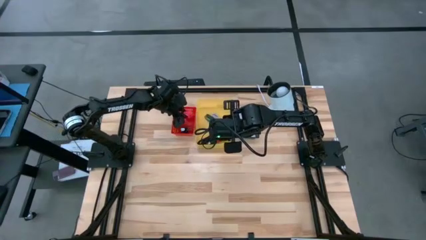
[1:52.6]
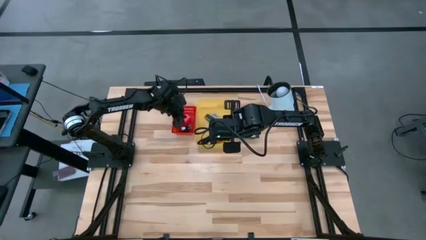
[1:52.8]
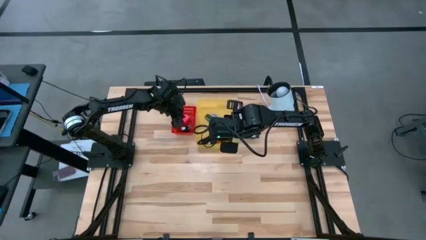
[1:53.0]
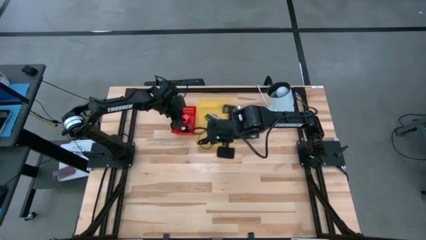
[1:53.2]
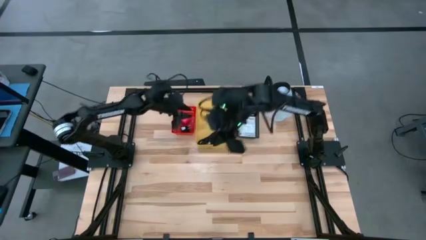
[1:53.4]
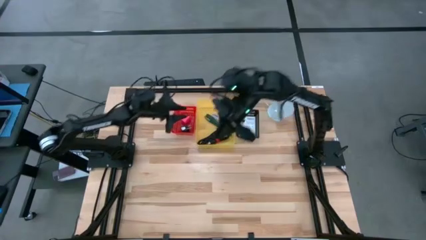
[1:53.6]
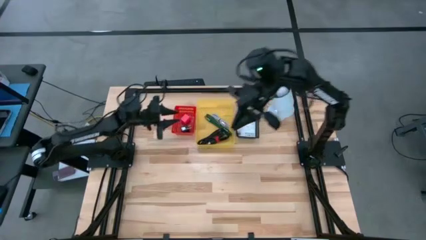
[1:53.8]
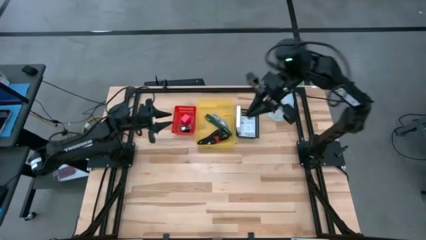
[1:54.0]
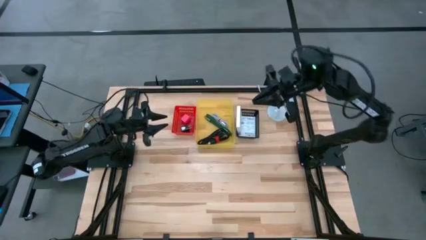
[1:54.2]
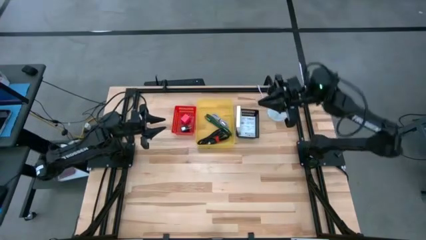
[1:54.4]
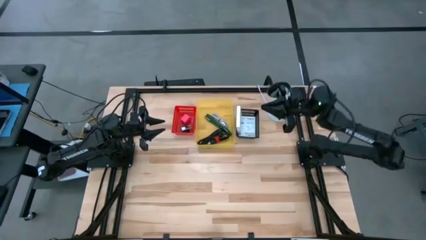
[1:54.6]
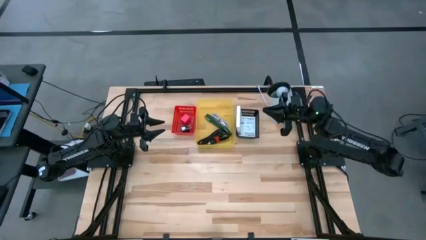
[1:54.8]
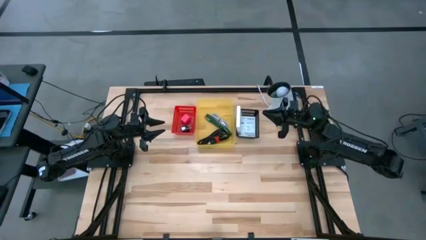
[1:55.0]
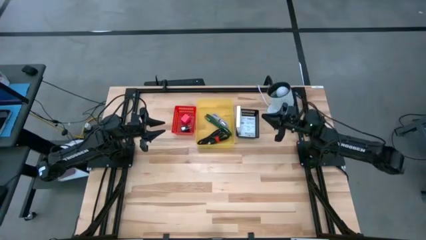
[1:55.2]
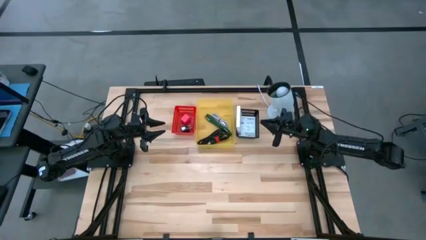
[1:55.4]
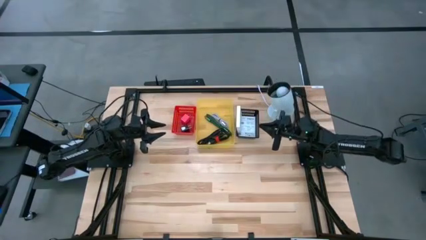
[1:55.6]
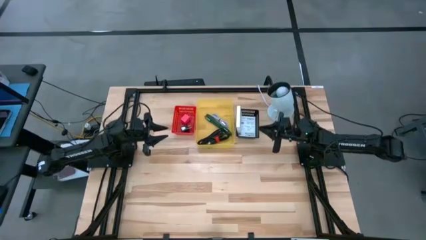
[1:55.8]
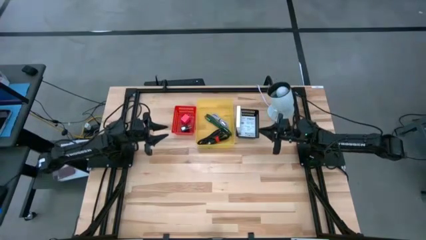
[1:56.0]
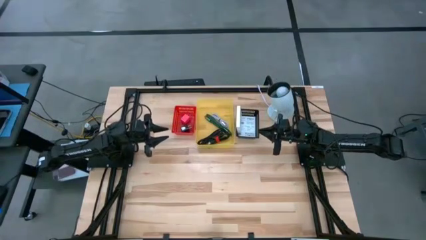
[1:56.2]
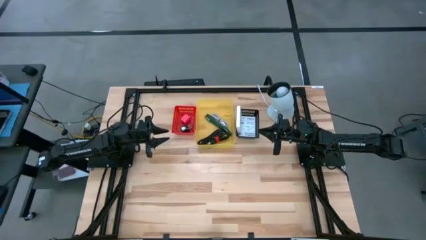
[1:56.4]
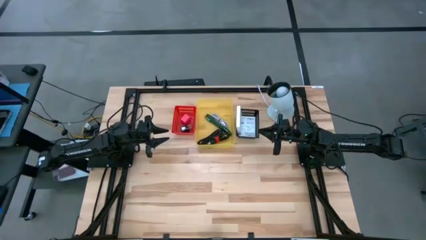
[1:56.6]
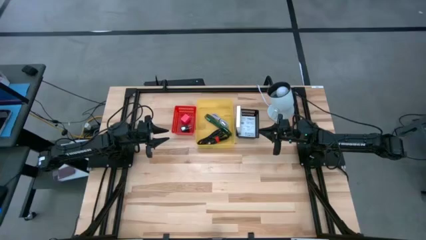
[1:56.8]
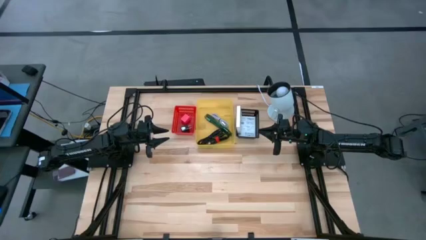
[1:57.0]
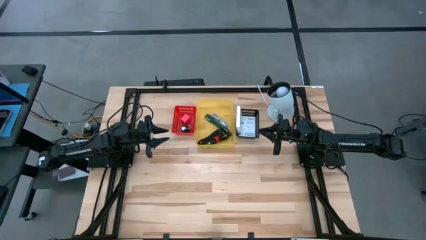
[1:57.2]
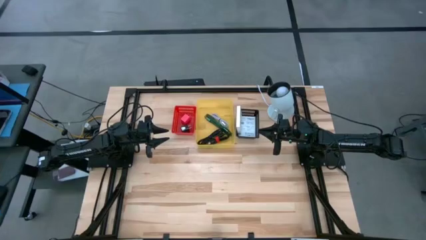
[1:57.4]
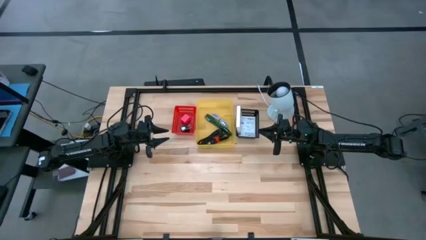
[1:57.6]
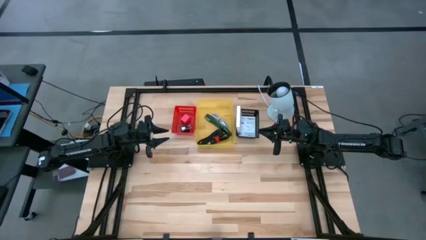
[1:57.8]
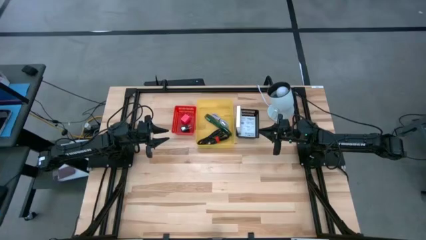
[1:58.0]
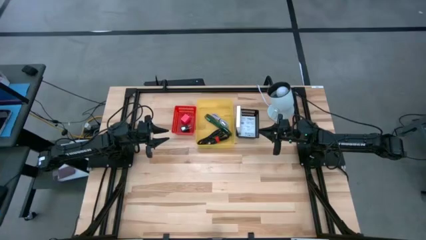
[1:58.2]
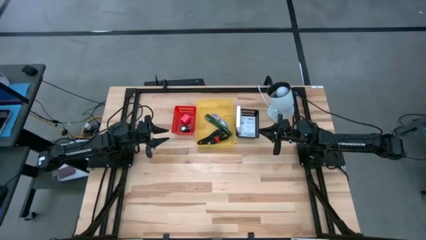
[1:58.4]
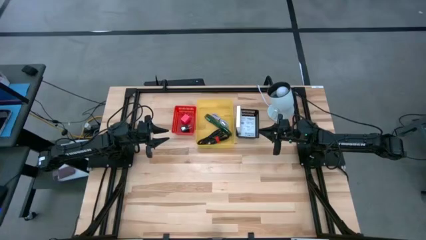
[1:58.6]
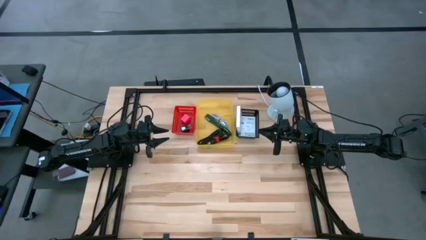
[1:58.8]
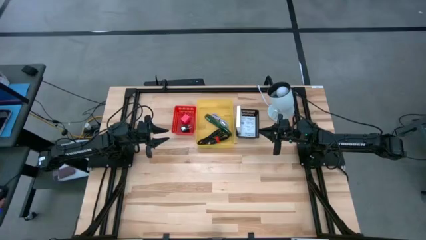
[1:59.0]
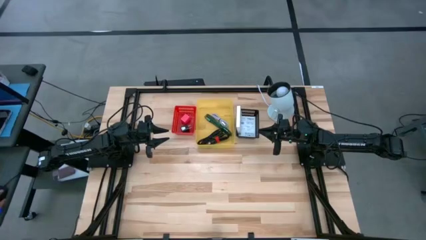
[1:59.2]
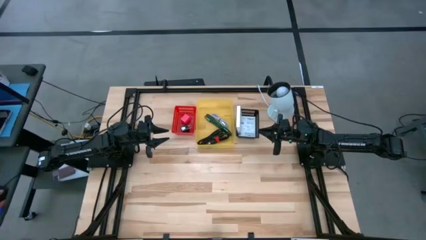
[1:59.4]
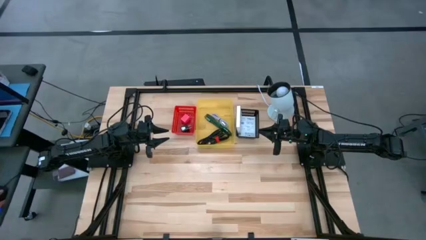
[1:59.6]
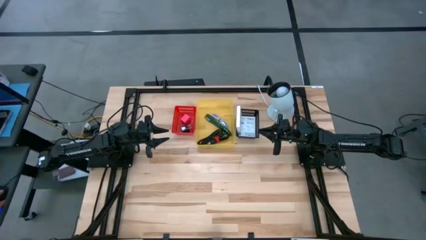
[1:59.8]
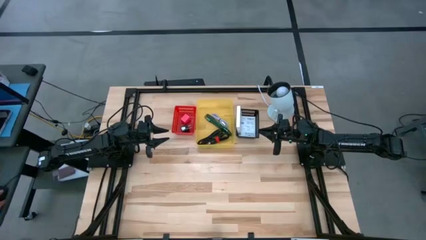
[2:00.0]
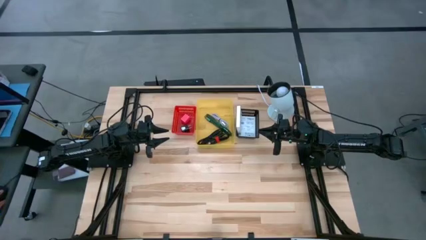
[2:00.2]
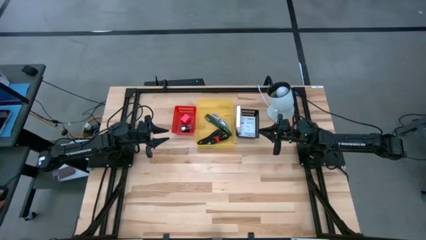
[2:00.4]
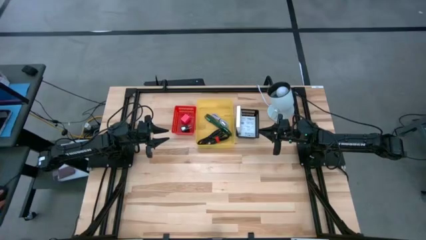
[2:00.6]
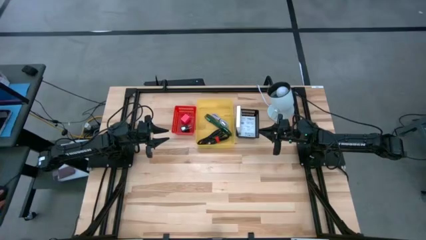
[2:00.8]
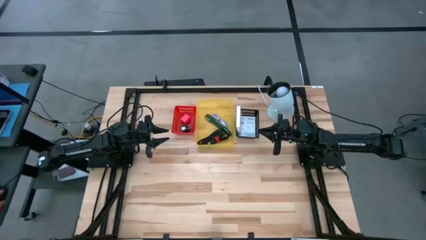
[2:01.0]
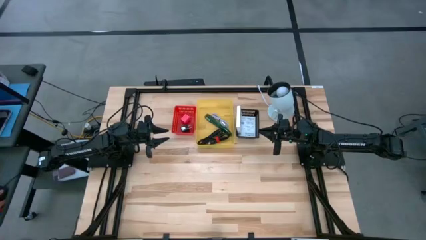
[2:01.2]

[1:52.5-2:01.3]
Task: Pick and place items into bin
Return to Home Position

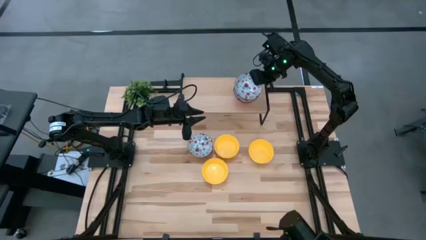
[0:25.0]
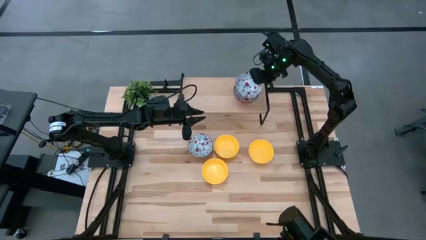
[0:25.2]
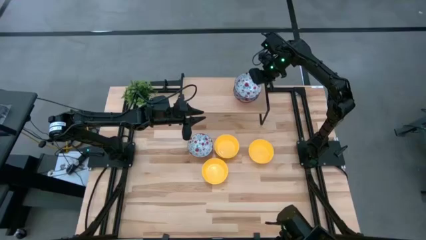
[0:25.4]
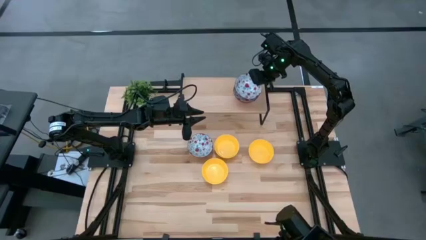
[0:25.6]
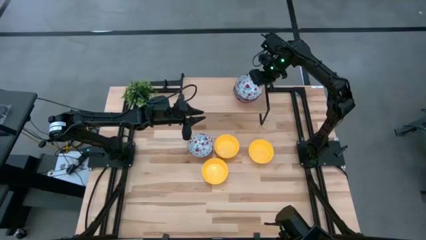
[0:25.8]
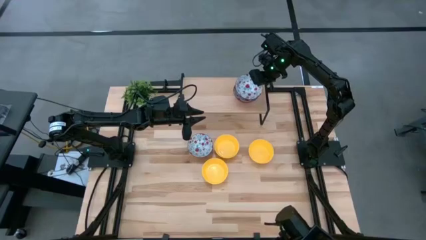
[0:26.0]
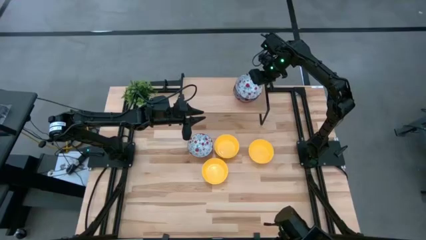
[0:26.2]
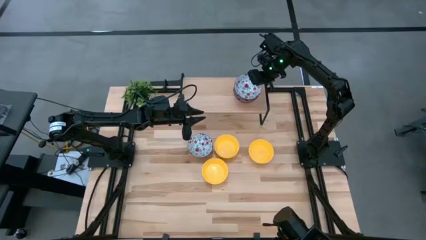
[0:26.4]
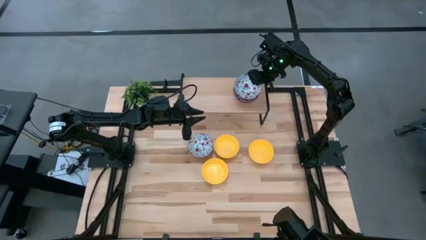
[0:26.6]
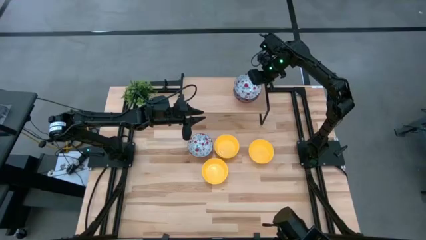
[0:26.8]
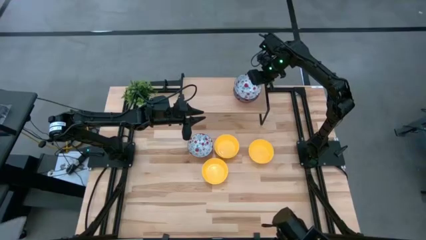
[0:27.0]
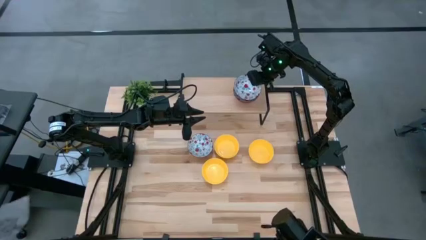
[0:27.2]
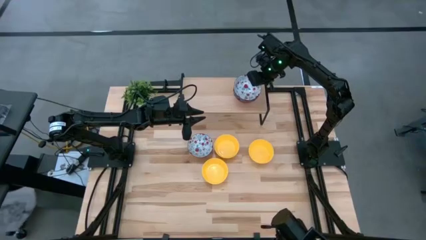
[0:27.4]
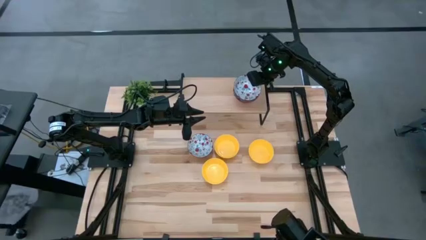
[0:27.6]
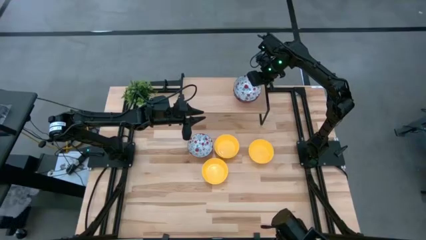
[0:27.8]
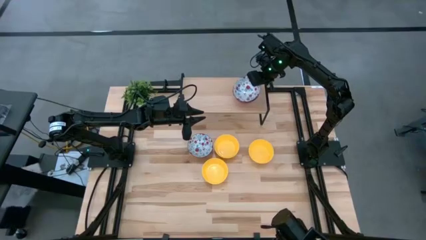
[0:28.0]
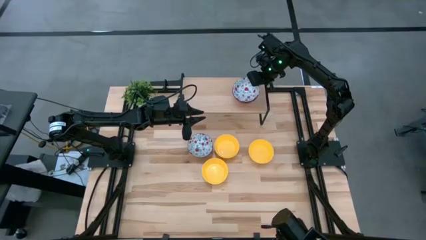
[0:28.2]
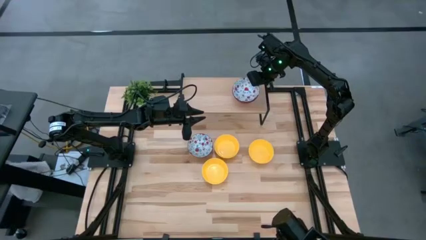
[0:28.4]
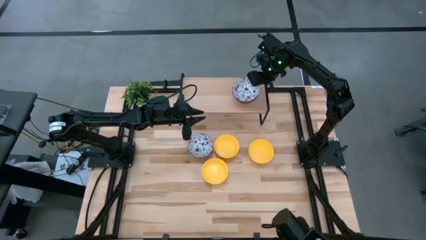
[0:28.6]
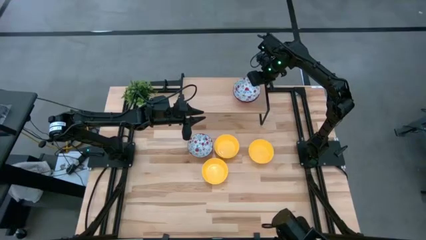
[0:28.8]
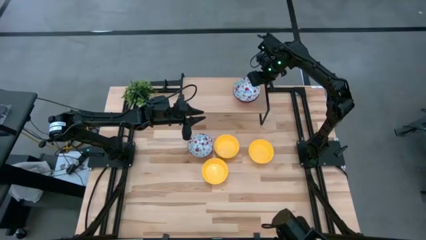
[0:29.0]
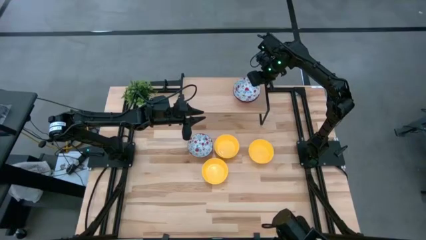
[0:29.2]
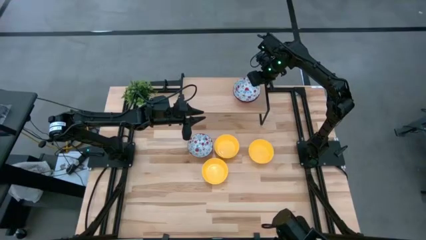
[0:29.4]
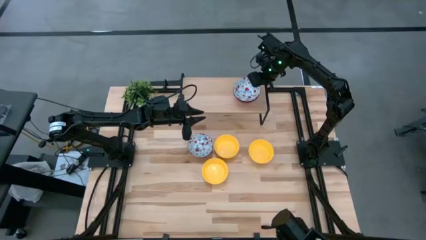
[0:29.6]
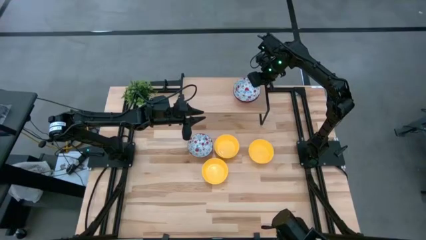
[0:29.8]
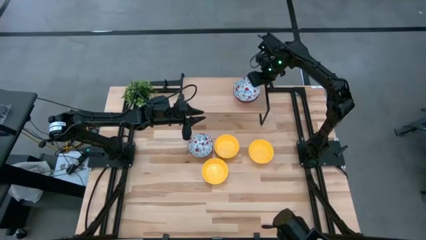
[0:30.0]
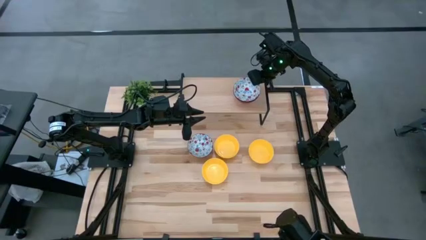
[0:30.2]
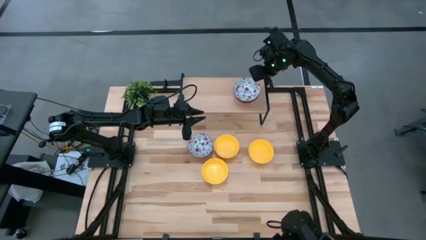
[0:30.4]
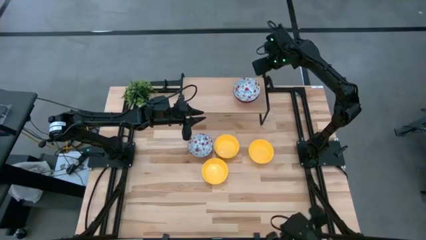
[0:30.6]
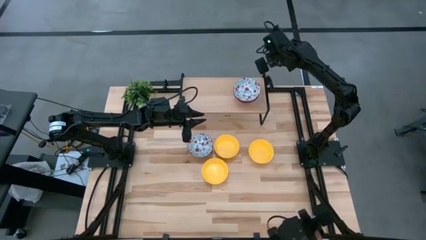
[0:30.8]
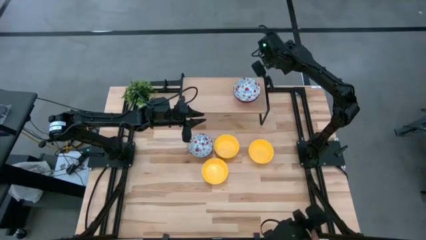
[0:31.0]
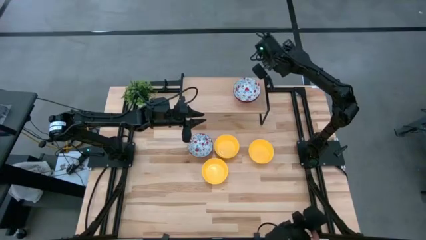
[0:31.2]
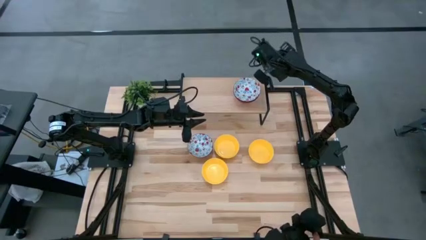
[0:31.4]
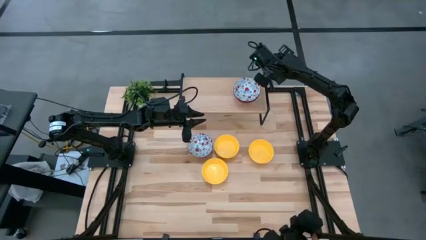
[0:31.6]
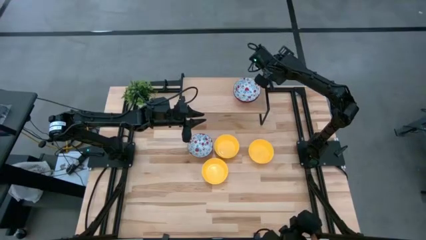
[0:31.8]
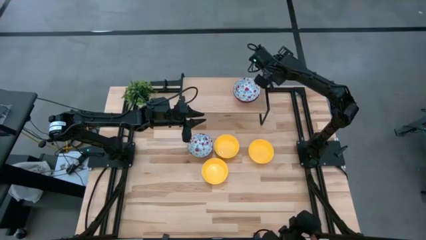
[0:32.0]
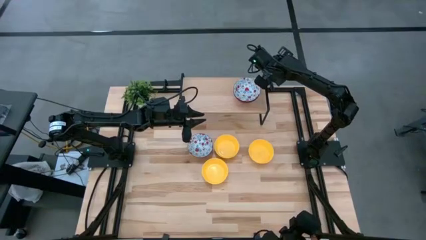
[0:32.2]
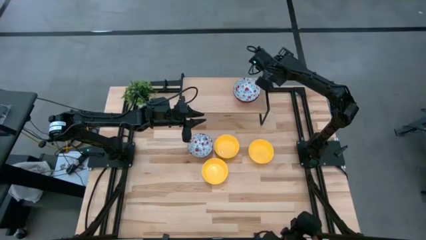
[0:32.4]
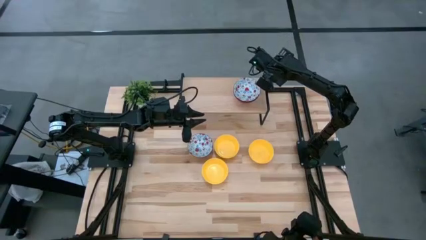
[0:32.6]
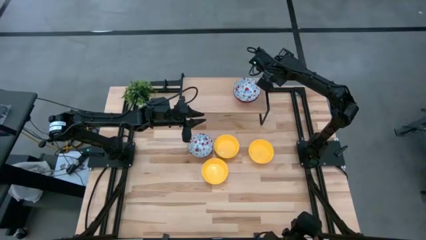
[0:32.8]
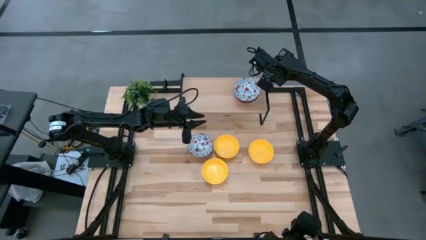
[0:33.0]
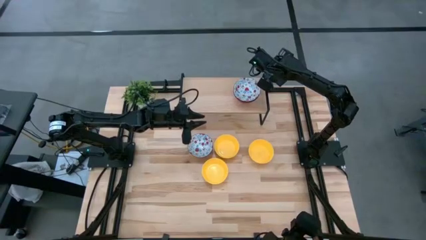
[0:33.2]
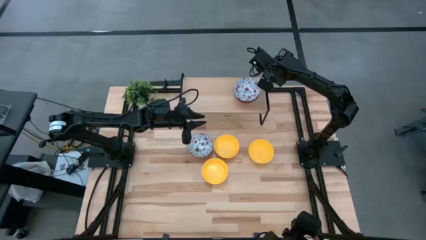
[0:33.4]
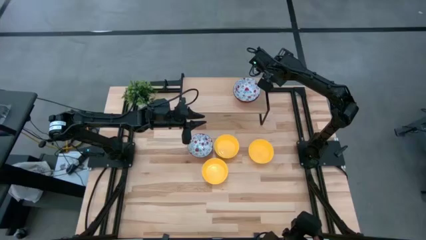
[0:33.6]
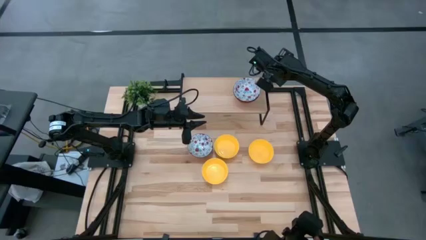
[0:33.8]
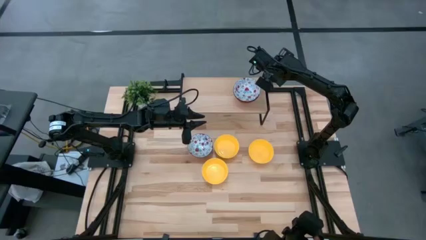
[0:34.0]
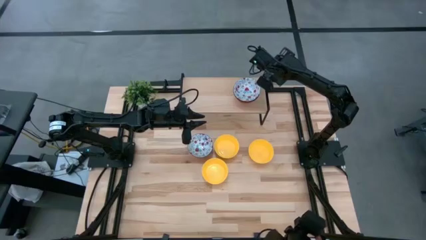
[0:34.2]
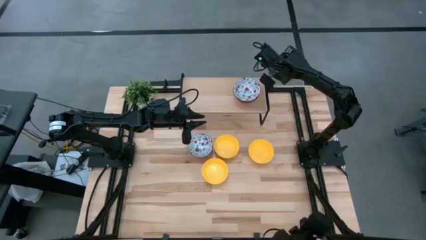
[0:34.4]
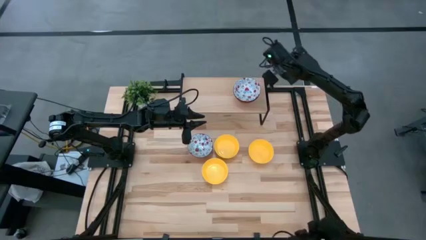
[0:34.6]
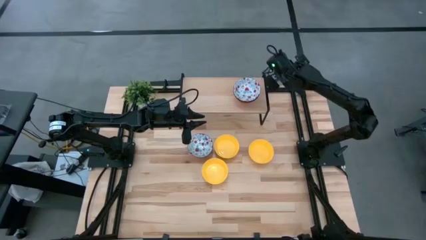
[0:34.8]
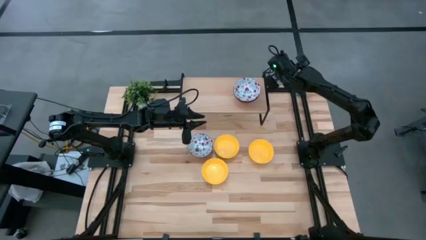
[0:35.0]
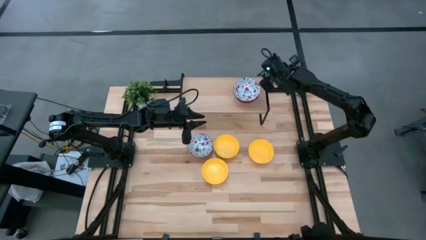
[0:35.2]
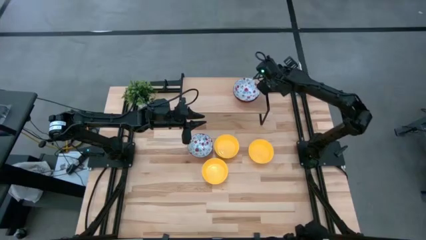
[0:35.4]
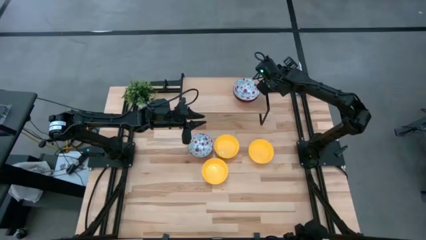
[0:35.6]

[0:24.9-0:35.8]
Task: Pick & Place Mini bowls
Stack the right white patterned bowl on top of the white patterned bowl on the shelf
